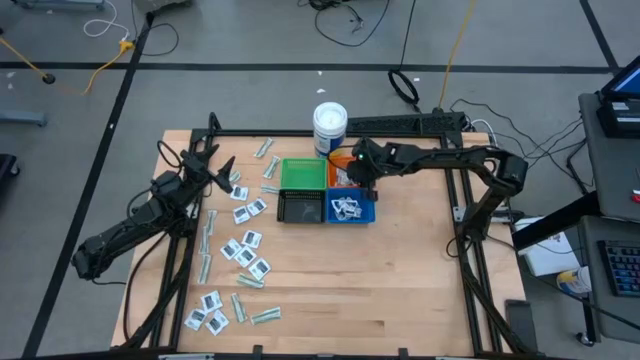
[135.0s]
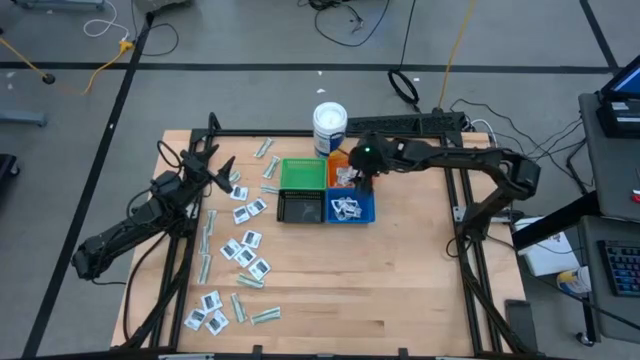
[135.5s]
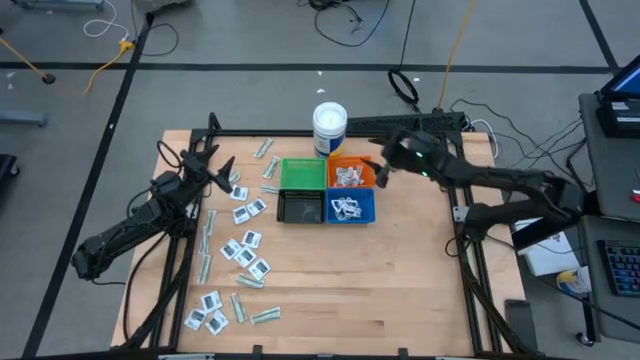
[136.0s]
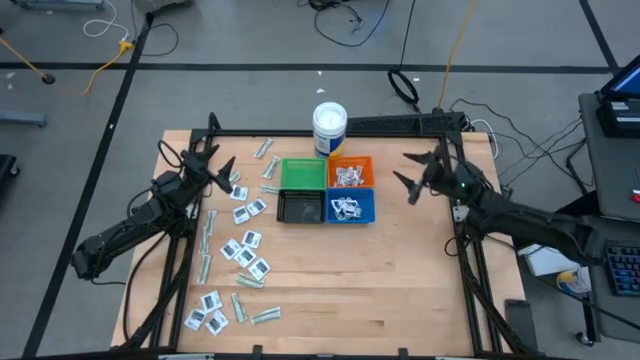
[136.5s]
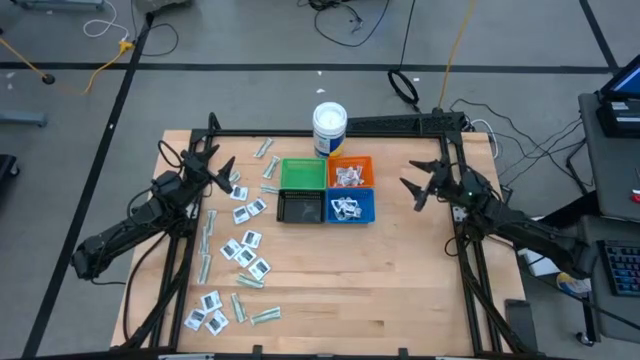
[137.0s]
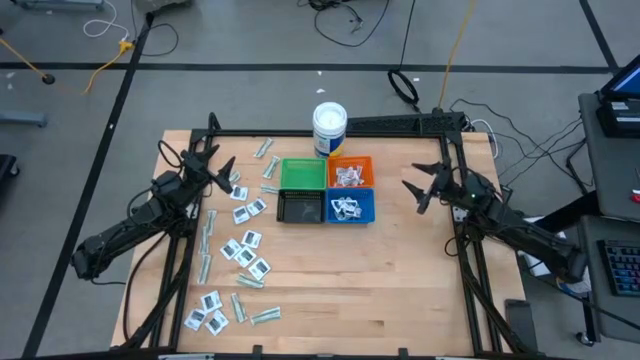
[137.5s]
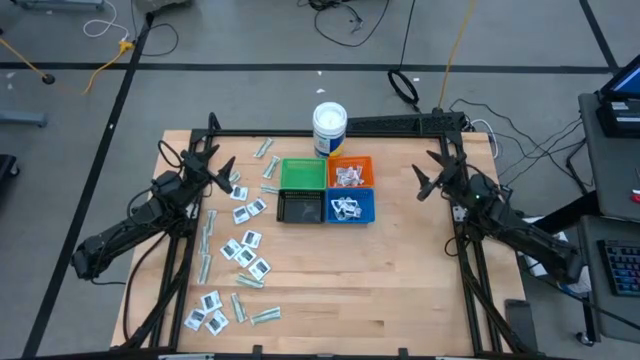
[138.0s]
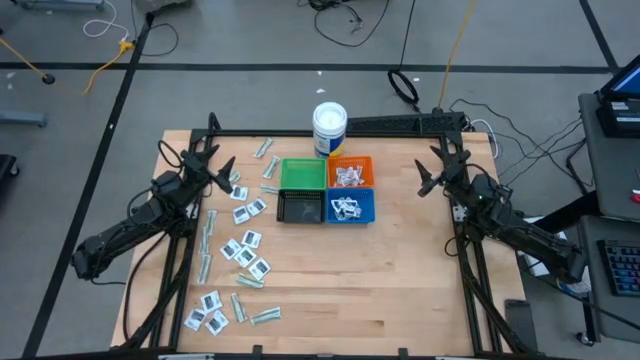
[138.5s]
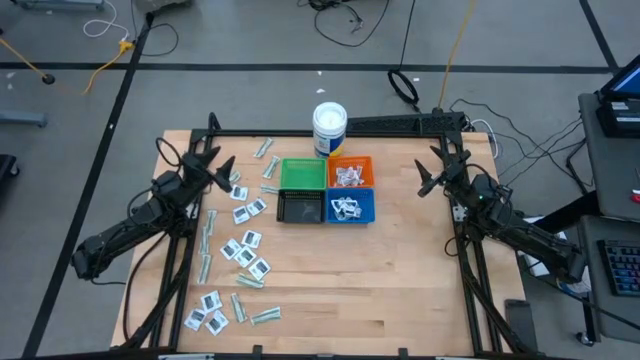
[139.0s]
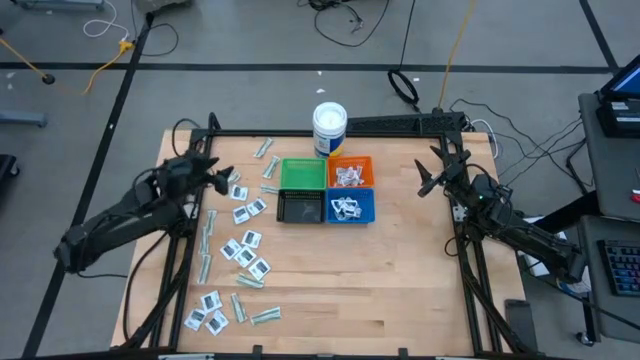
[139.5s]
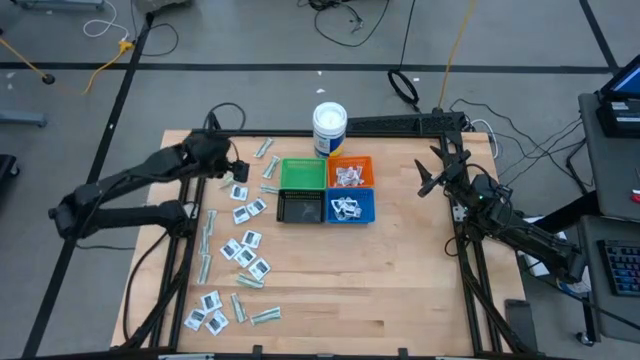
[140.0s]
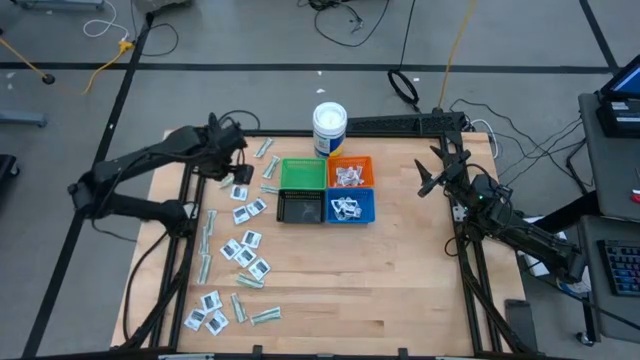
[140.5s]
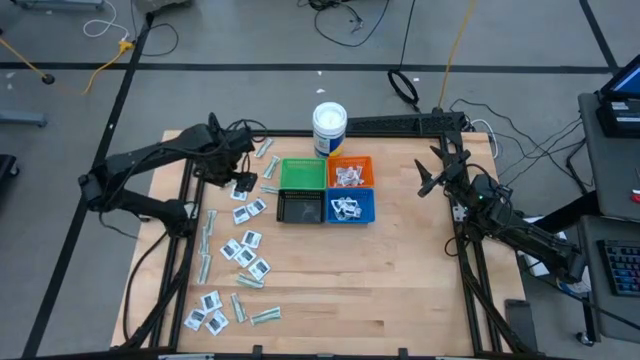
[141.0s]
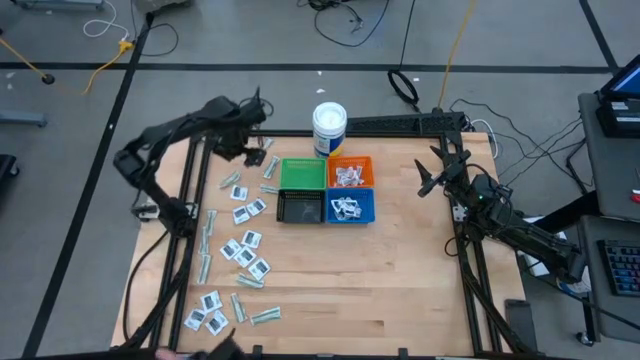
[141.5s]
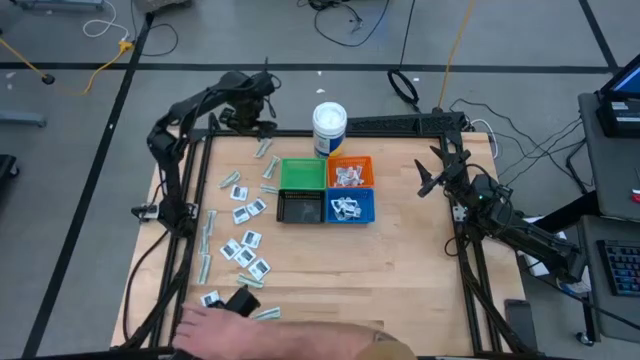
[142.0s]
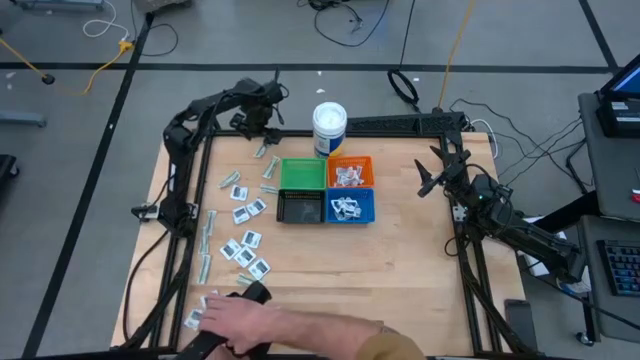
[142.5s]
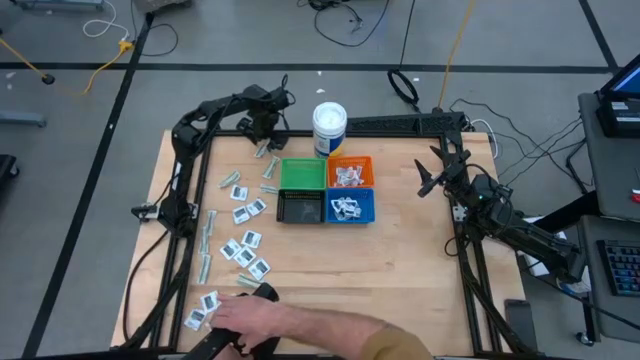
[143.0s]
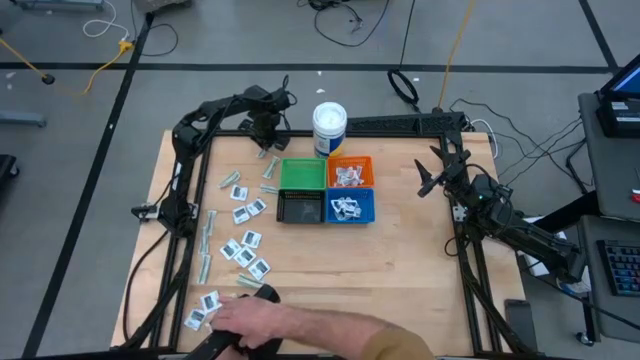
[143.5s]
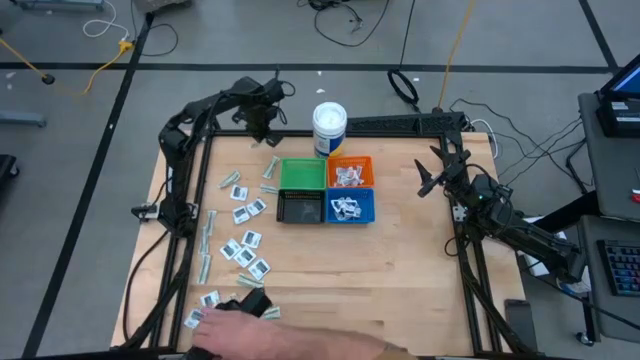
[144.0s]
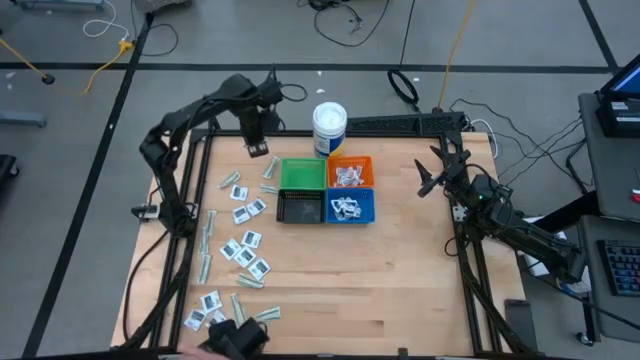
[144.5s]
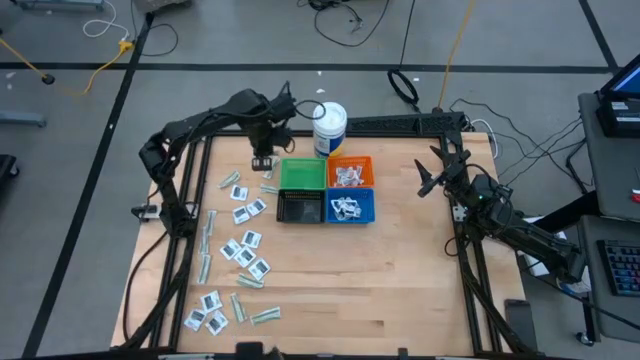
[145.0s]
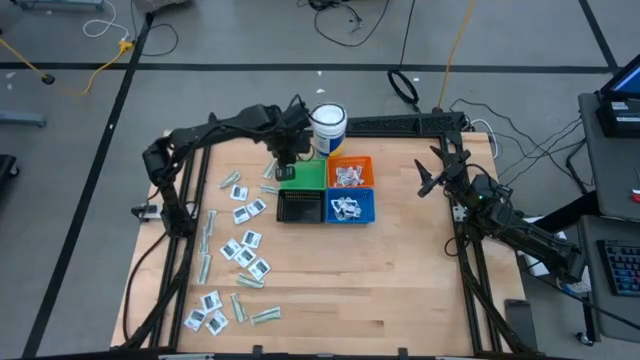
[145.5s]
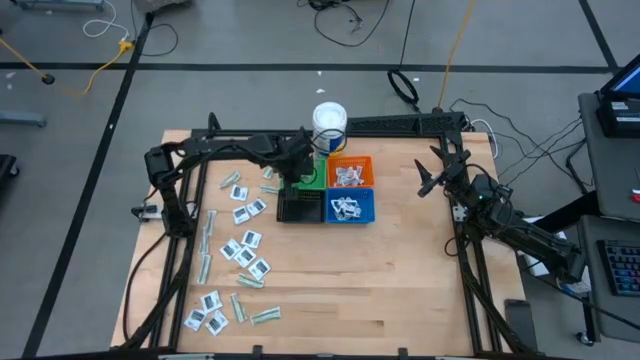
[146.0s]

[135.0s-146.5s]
Task: Pick & Place First Aid Supplies
Put the green bandage pad into the green basket

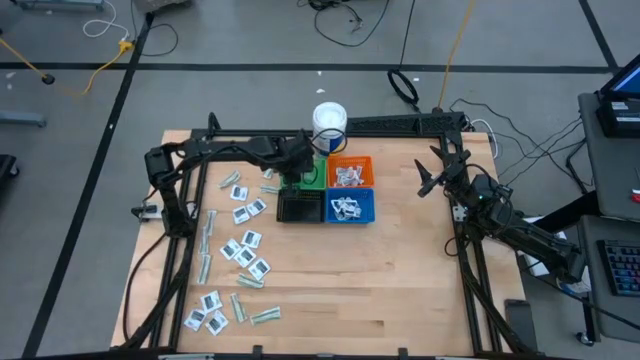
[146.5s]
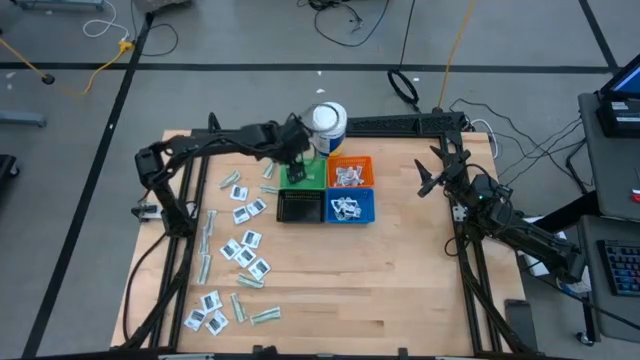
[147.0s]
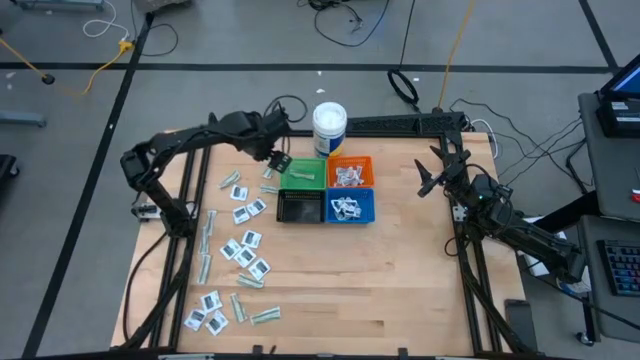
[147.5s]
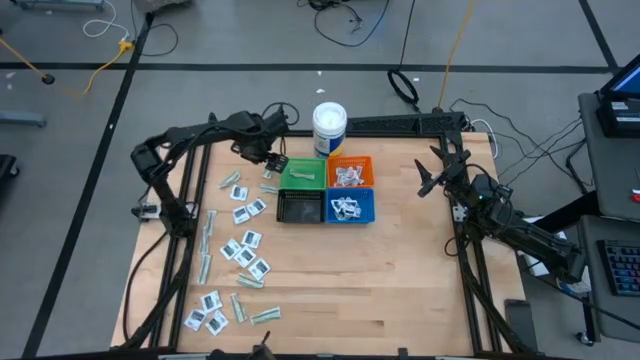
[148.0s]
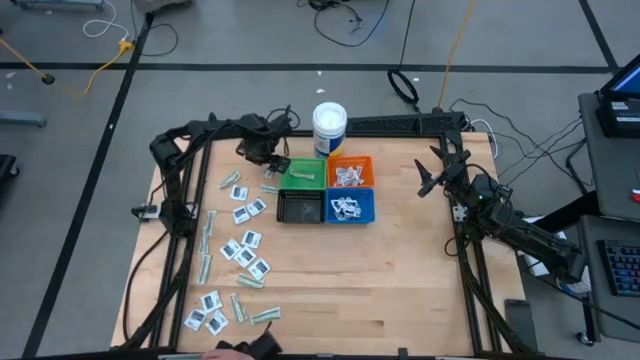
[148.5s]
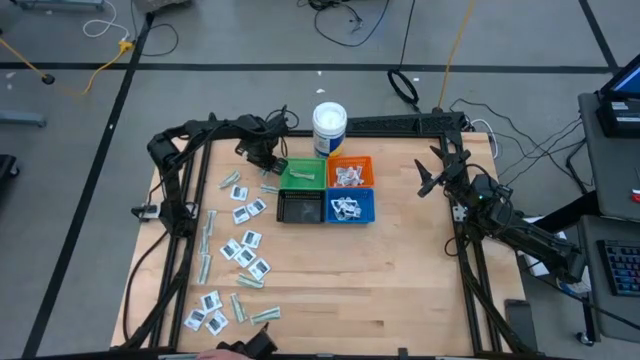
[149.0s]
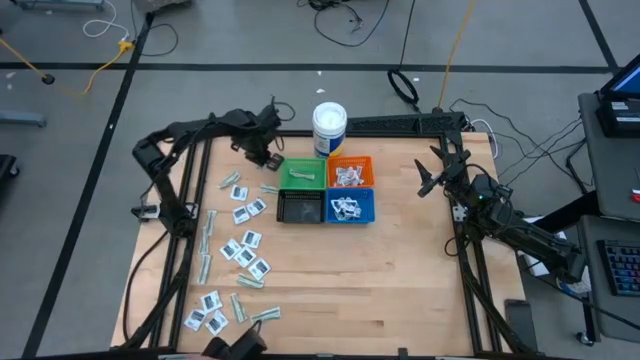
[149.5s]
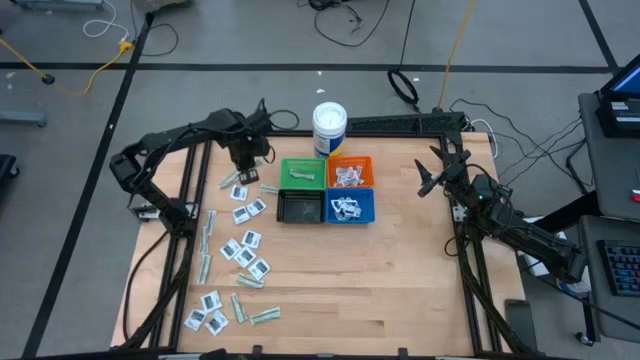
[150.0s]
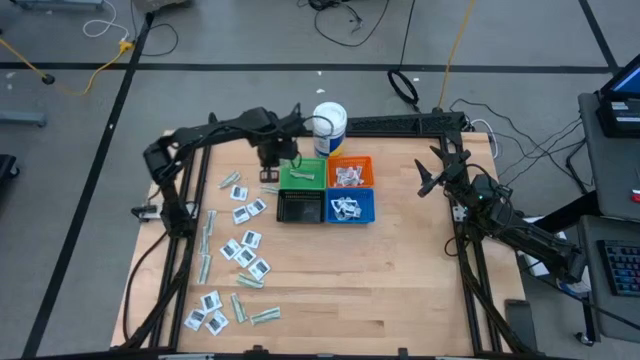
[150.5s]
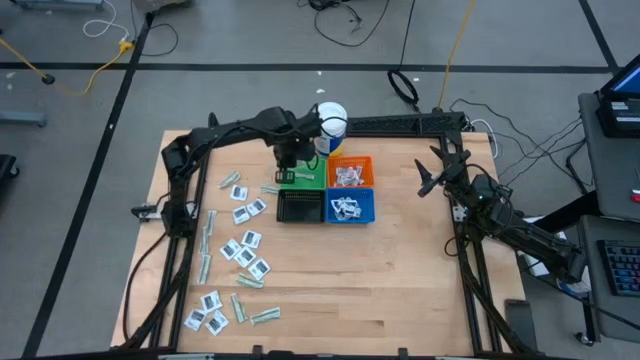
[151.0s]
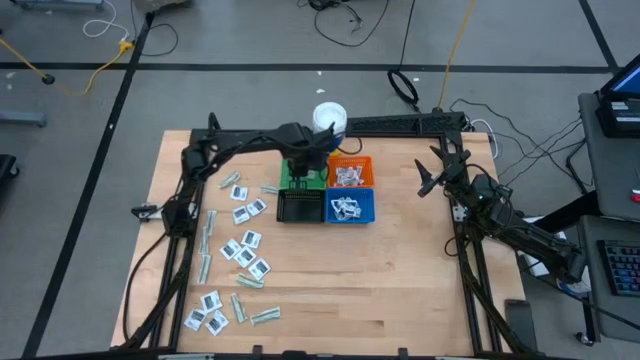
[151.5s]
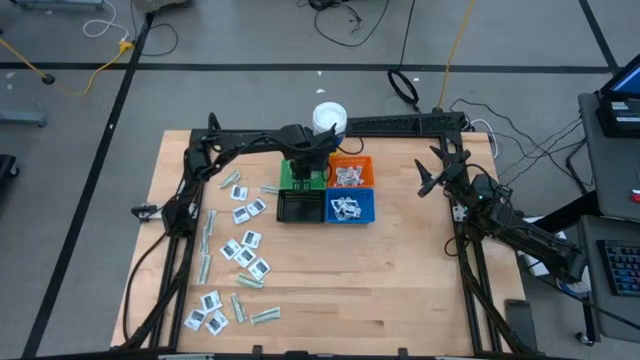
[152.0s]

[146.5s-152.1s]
Put the green bandage pad into the green basket

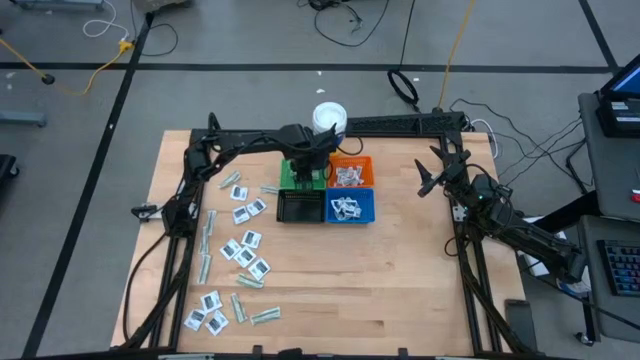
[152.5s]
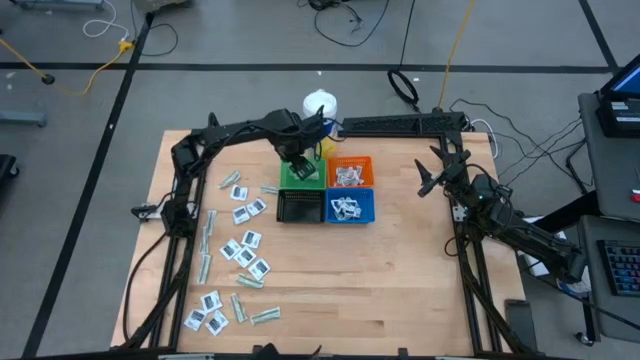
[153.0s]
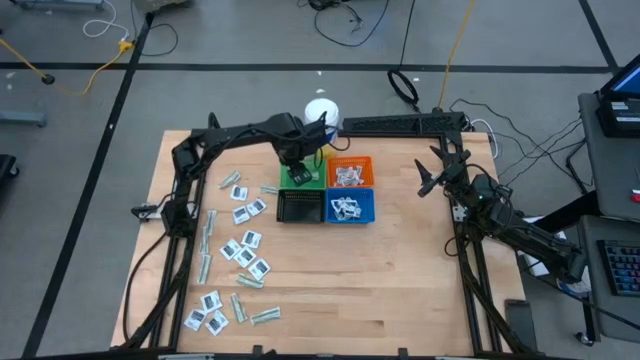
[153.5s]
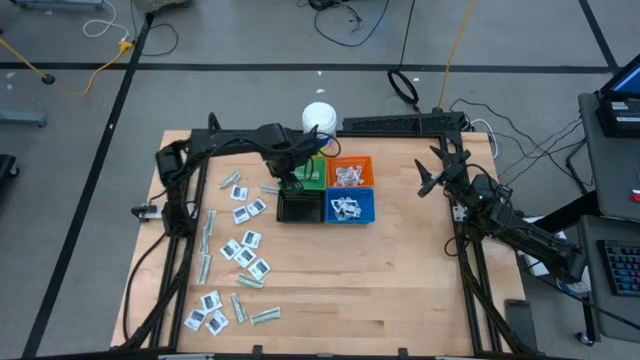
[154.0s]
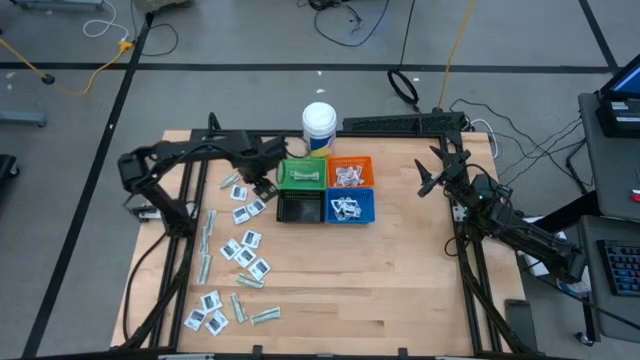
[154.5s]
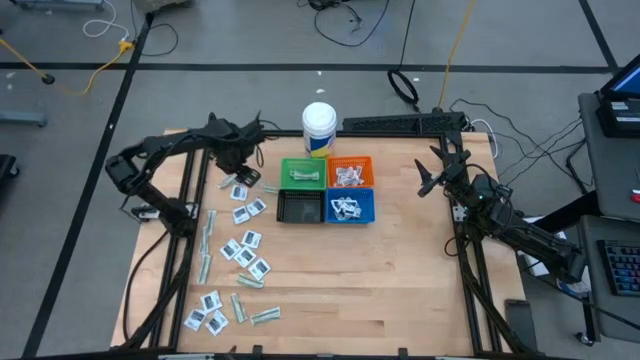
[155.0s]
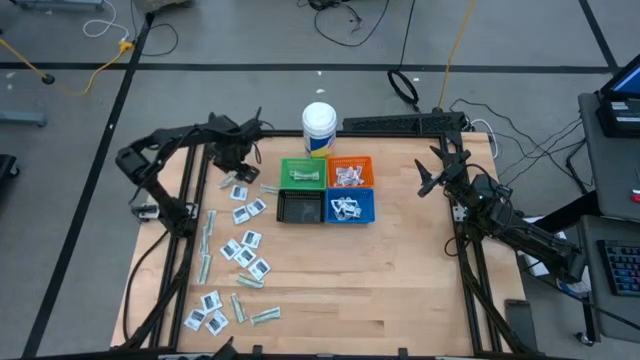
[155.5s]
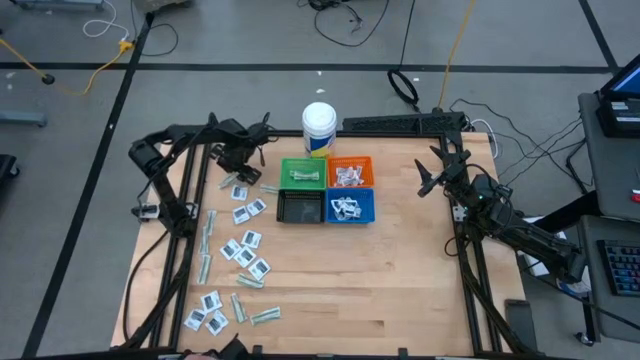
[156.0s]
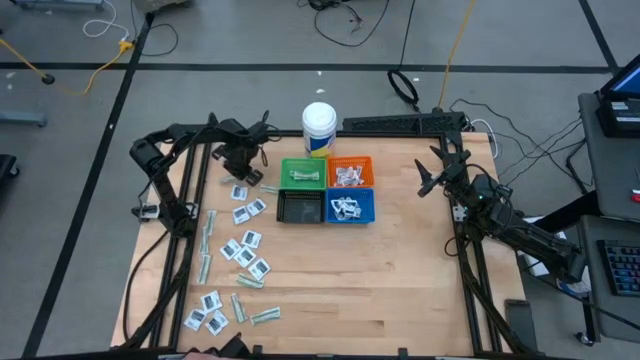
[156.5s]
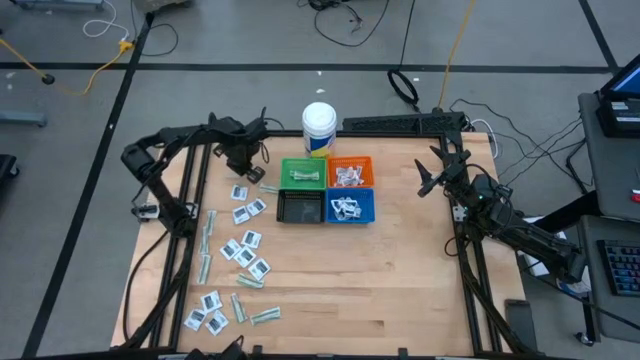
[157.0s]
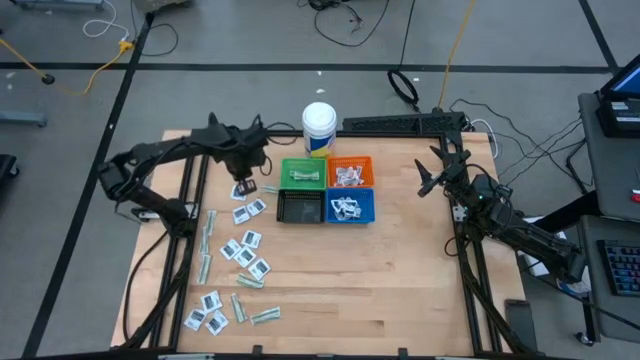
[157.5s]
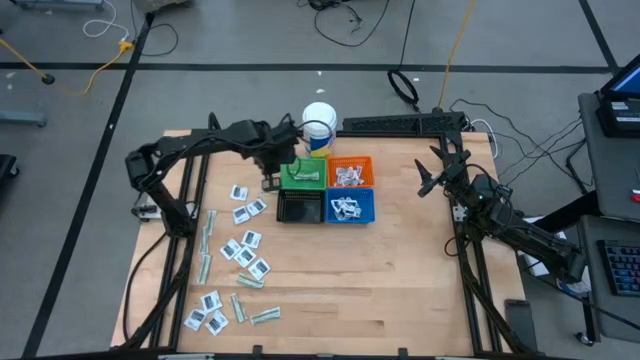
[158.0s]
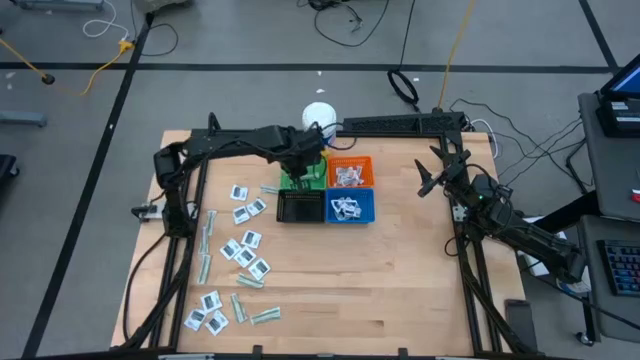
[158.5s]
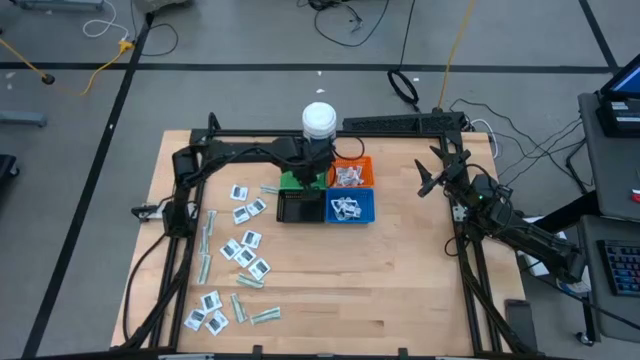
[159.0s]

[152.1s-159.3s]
Put the green bandage pad into the green basket
